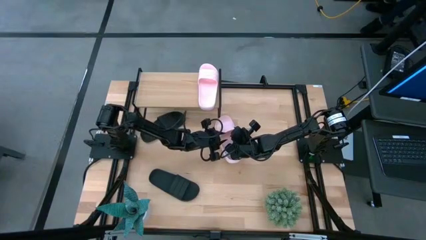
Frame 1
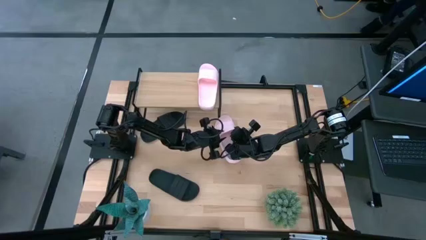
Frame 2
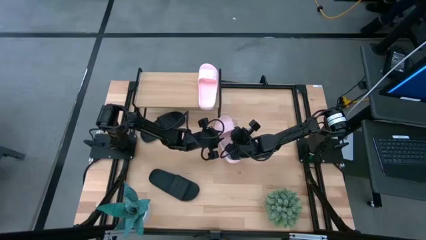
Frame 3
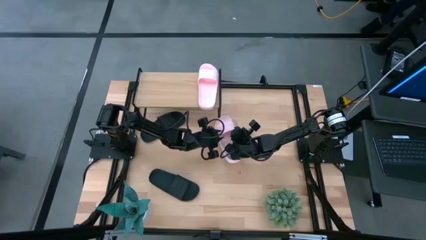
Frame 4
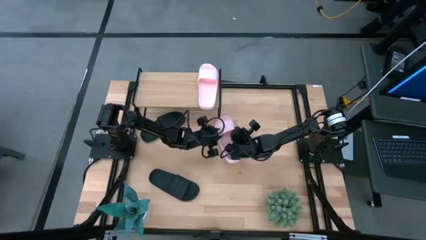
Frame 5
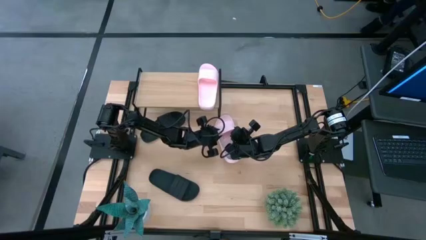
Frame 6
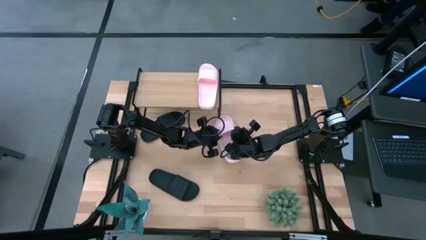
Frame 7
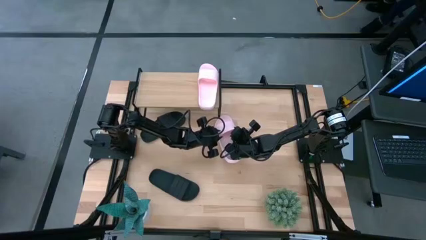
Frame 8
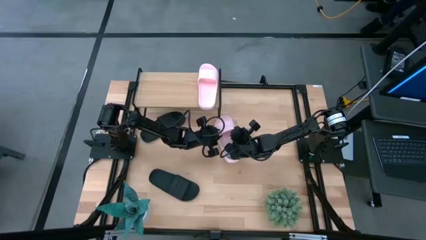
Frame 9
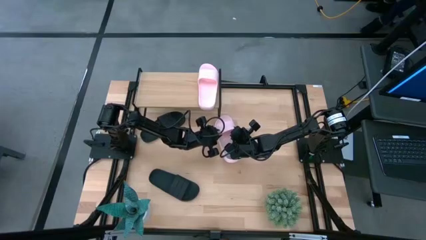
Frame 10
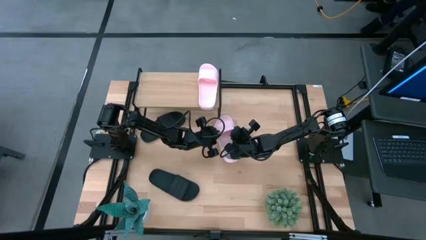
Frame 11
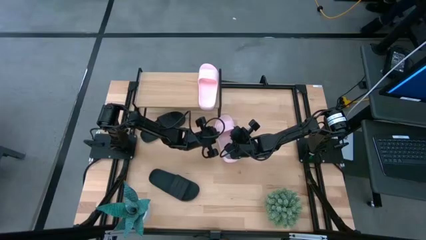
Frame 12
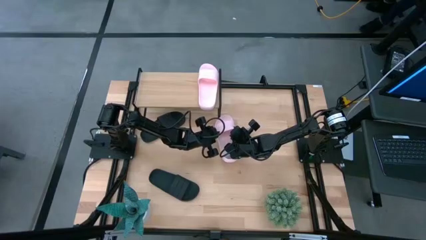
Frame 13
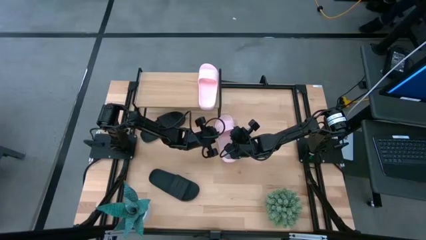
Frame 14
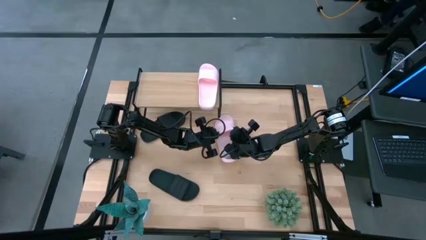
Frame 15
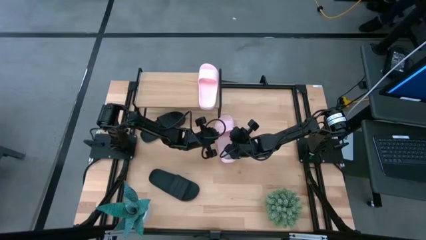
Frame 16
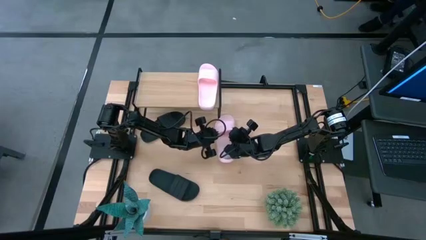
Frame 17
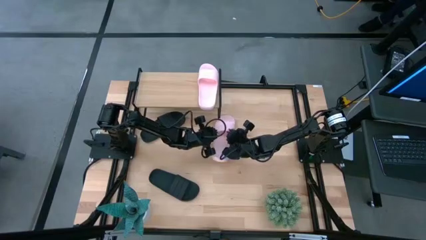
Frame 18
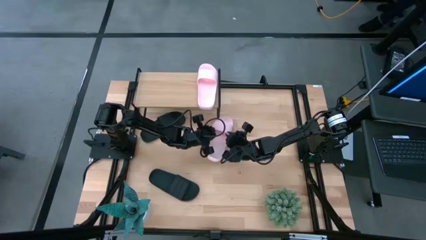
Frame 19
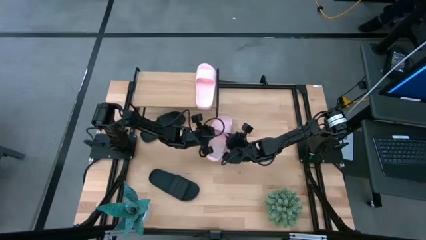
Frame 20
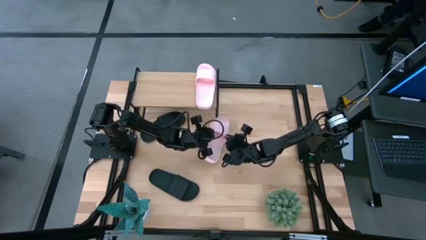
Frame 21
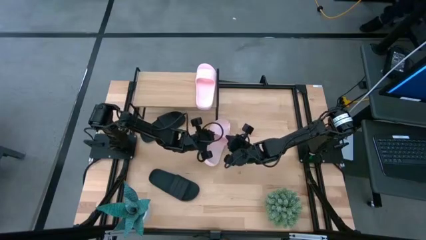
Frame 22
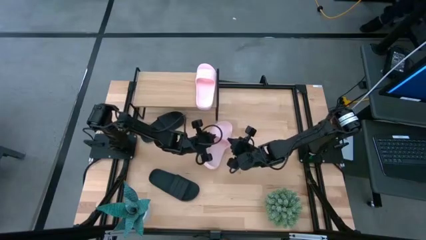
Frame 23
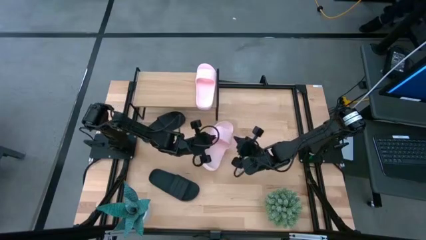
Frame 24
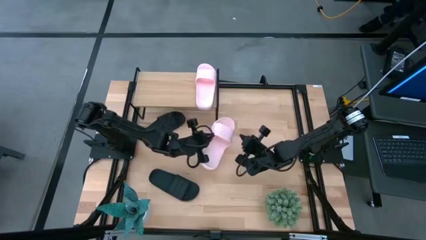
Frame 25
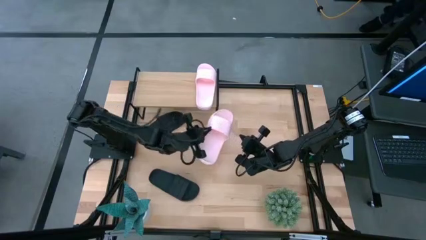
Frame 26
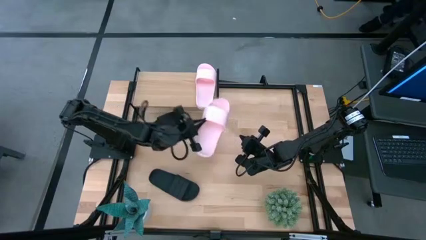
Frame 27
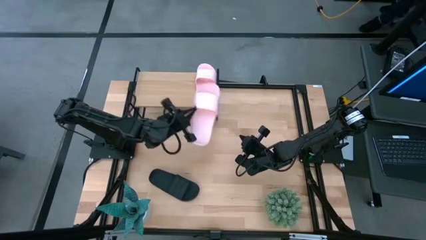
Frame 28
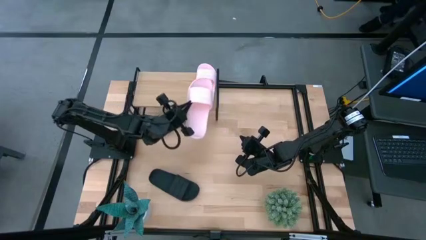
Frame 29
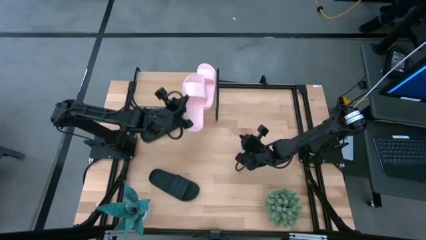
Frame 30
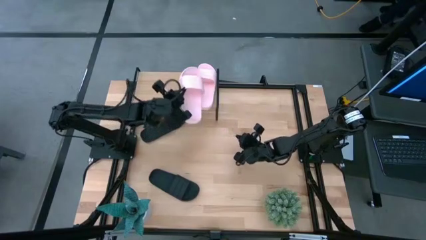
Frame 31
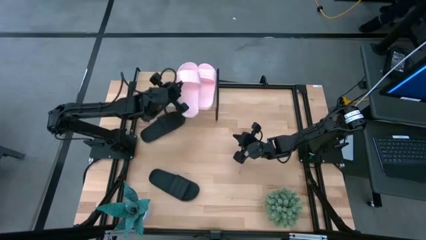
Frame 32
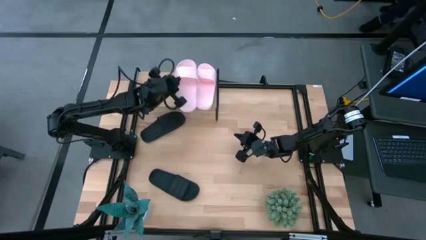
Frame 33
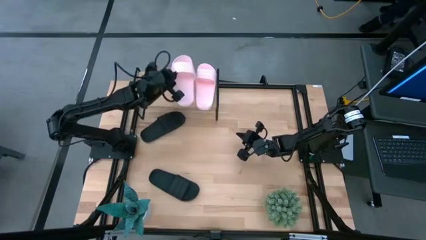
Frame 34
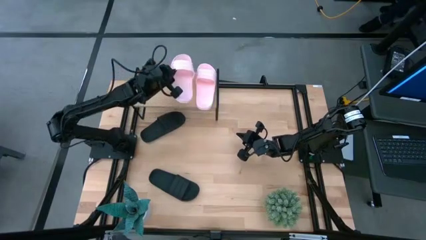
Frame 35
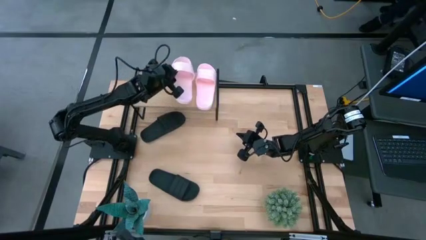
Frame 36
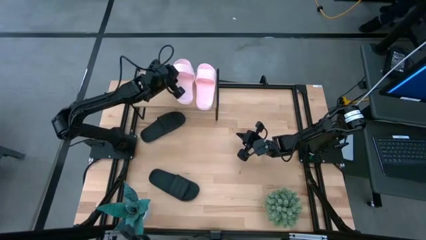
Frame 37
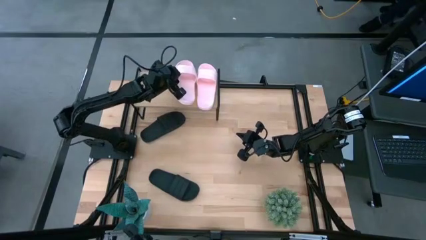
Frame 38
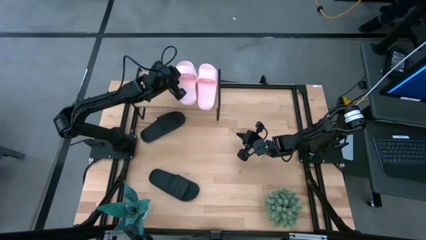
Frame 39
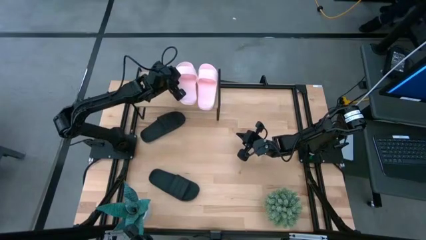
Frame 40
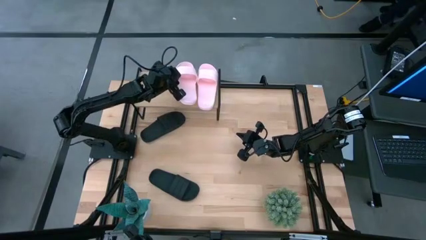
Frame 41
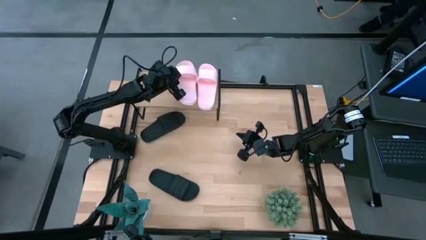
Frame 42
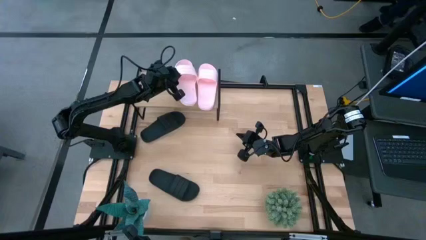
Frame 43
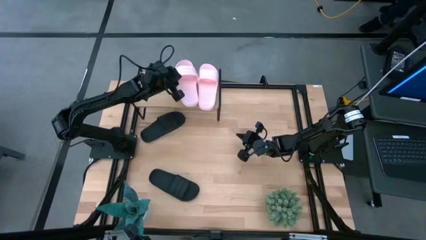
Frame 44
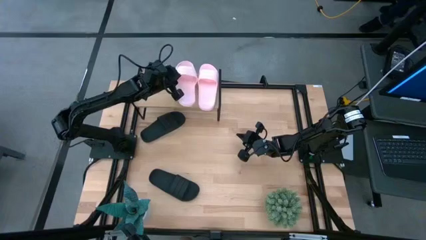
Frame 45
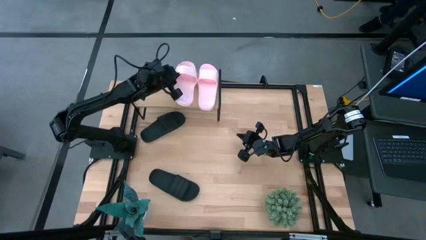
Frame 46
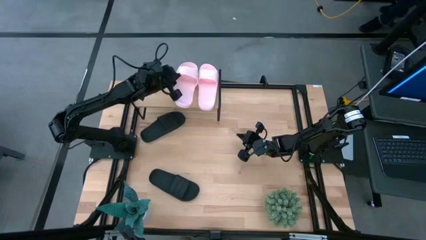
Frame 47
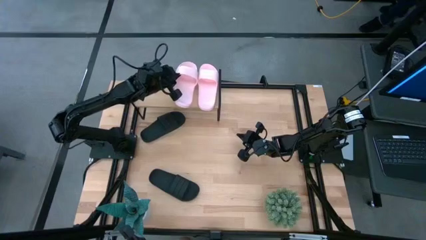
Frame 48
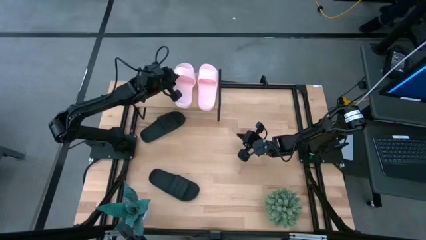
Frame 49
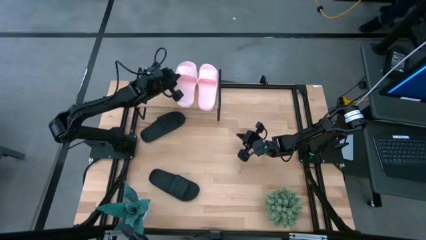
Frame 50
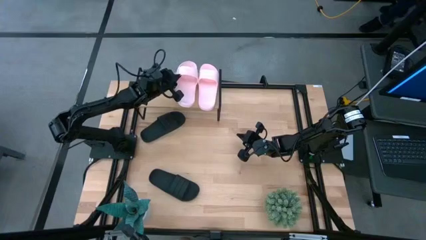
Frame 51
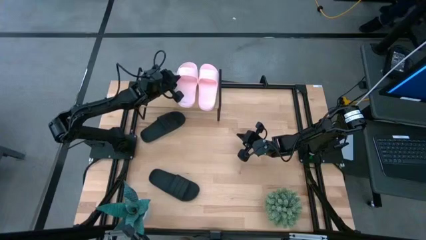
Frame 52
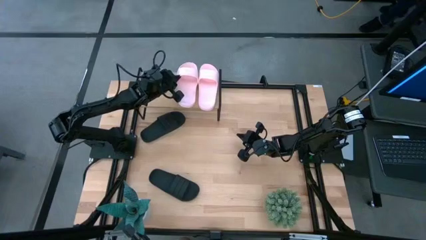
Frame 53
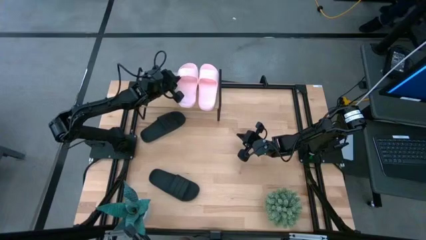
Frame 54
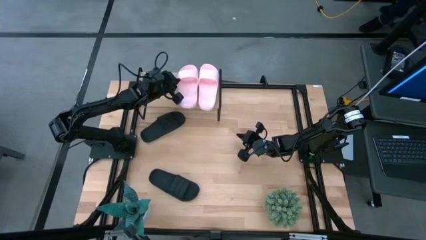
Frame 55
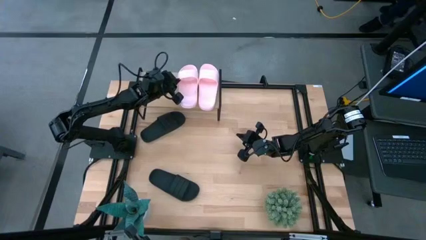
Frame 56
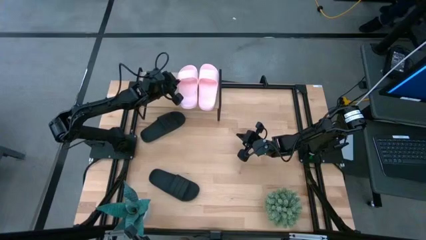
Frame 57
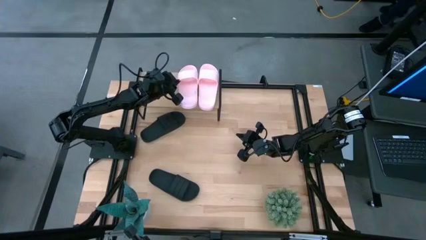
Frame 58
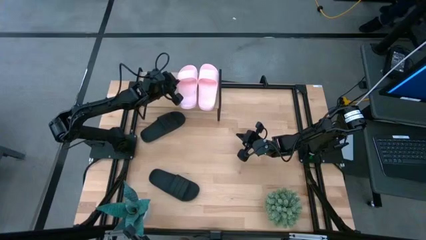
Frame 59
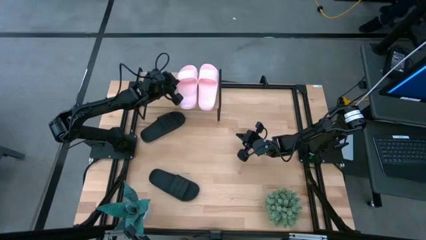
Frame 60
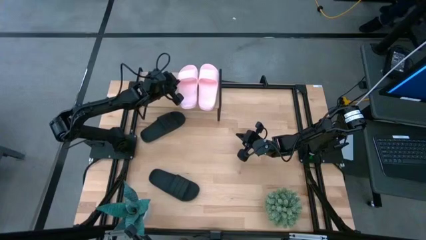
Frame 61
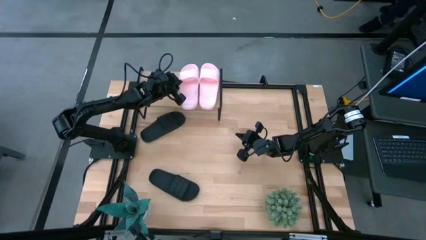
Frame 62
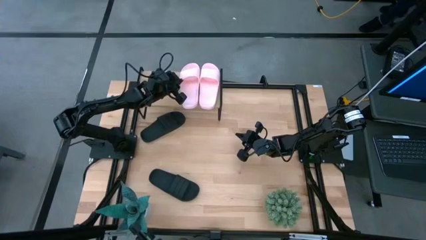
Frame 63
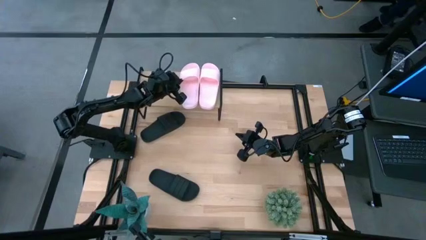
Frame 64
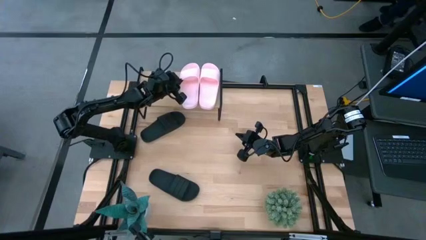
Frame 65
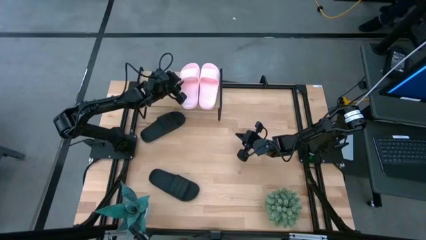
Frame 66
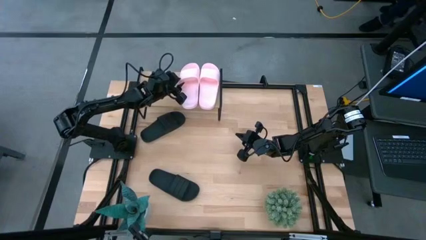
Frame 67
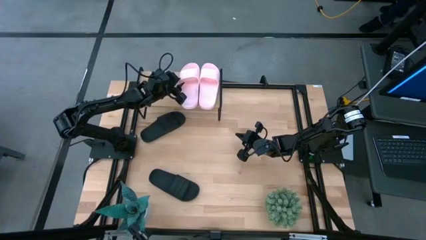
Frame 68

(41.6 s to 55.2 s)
Task: Pick and place slides into the shelf
Put the pink slide on the shelf
